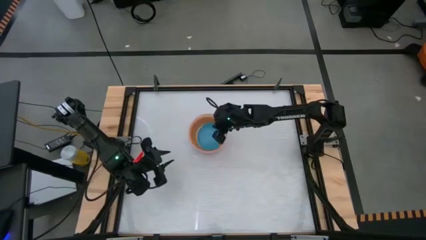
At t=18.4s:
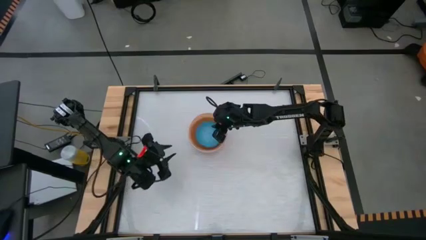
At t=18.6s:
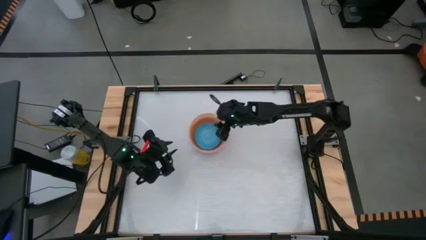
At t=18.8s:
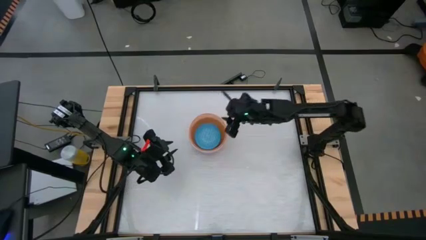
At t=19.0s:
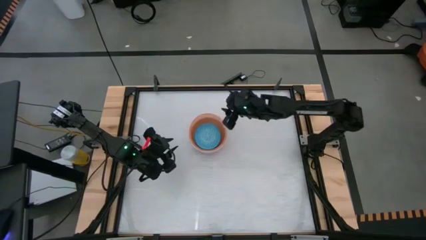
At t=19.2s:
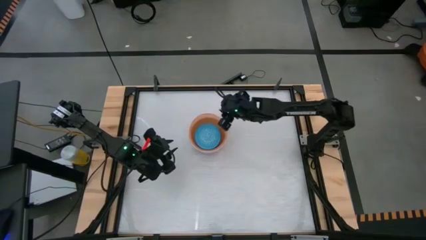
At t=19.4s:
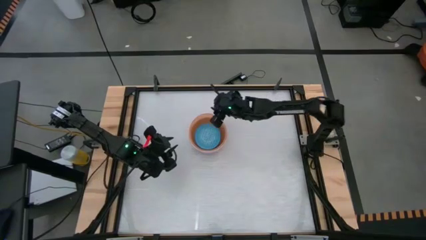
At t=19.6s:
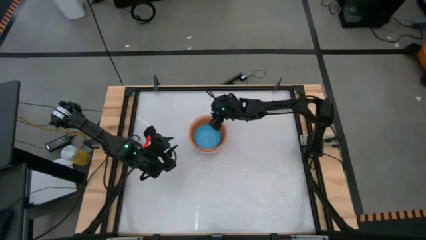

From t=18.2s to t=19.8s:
Adjust the orange bowl

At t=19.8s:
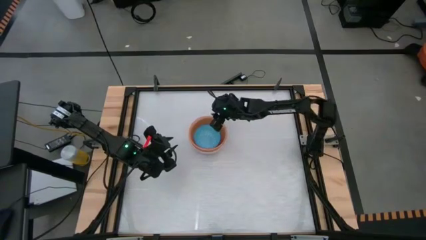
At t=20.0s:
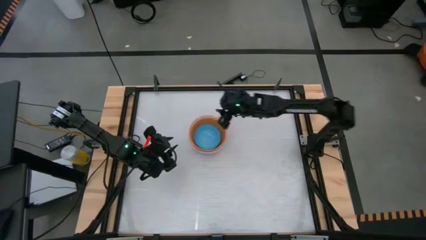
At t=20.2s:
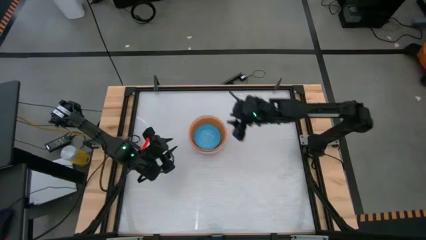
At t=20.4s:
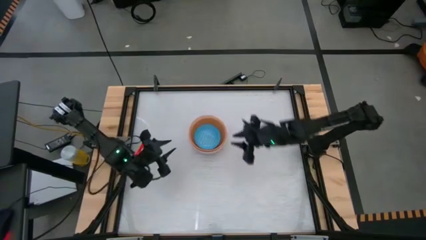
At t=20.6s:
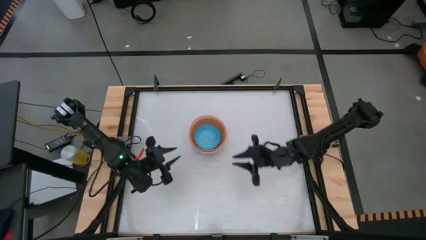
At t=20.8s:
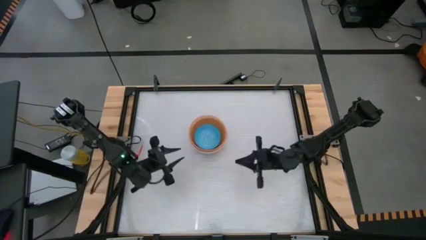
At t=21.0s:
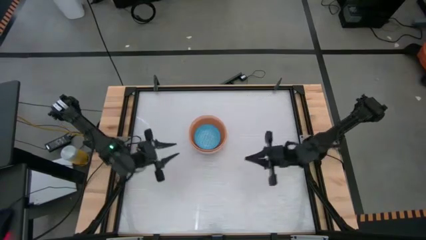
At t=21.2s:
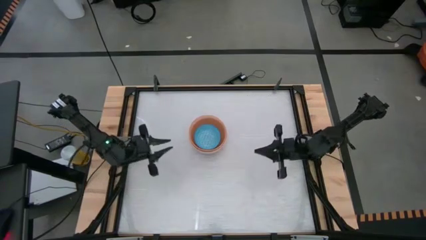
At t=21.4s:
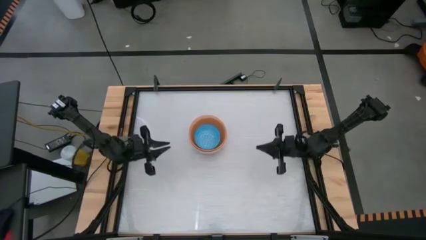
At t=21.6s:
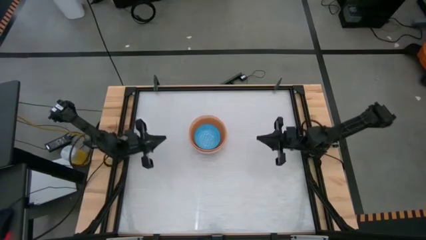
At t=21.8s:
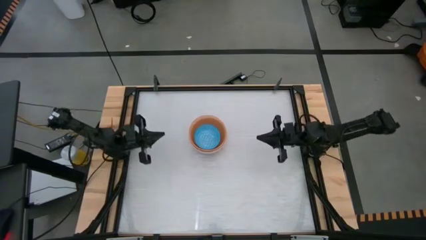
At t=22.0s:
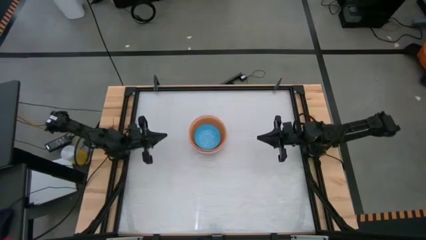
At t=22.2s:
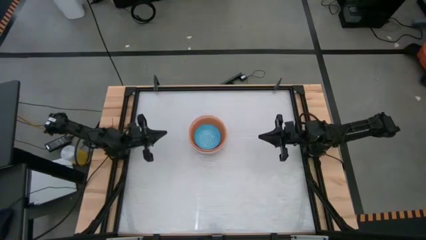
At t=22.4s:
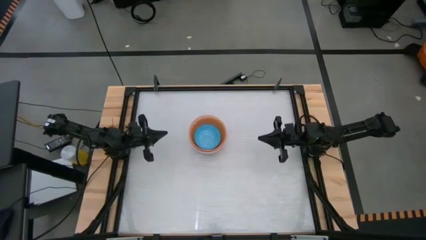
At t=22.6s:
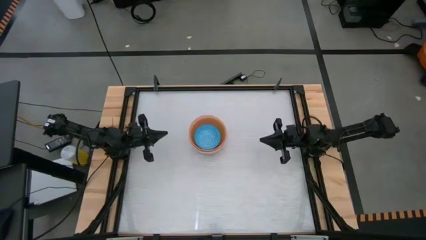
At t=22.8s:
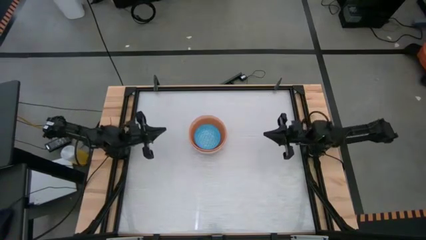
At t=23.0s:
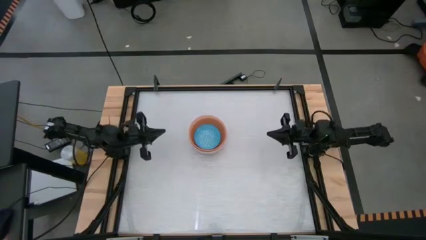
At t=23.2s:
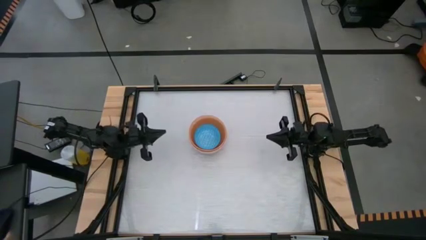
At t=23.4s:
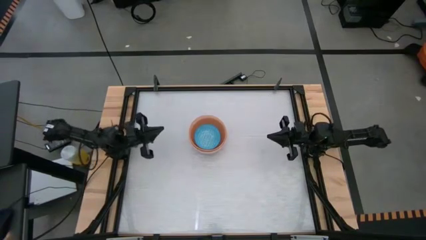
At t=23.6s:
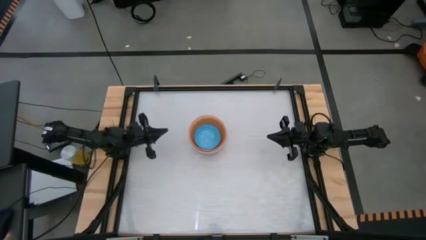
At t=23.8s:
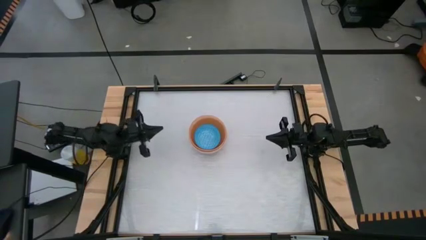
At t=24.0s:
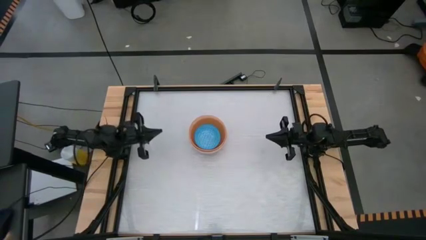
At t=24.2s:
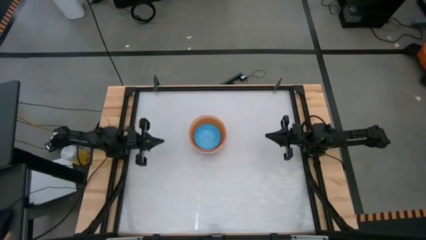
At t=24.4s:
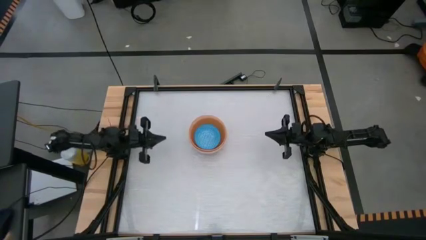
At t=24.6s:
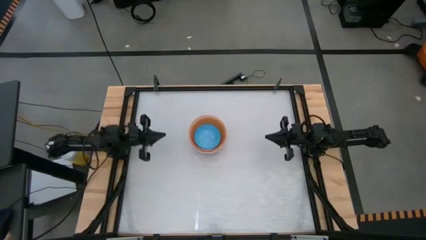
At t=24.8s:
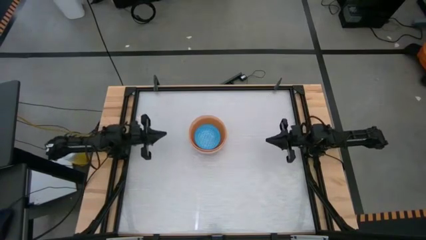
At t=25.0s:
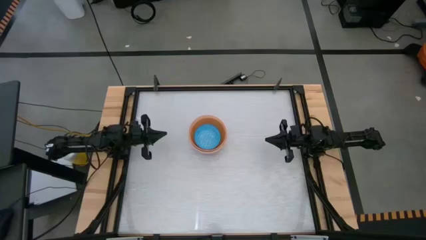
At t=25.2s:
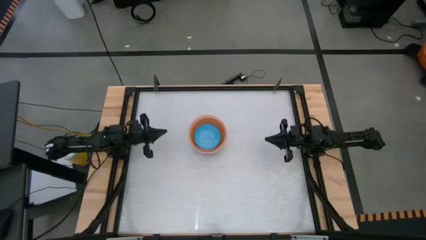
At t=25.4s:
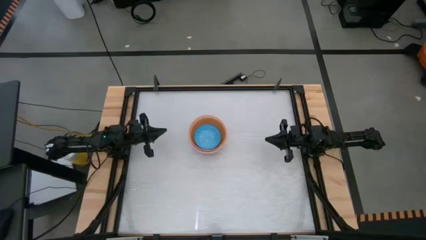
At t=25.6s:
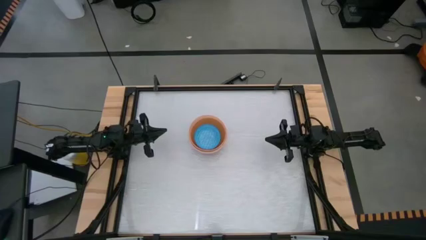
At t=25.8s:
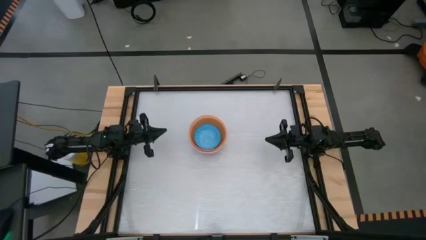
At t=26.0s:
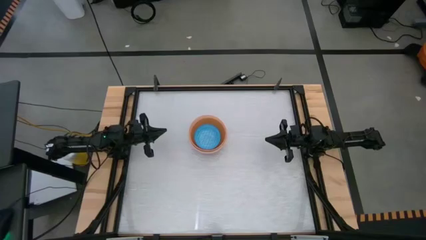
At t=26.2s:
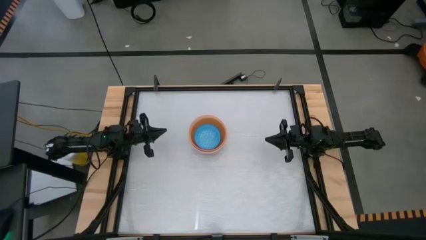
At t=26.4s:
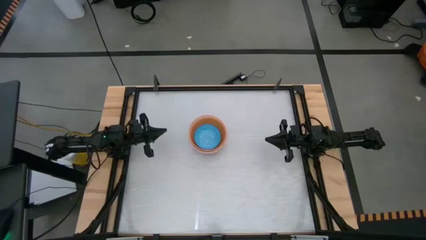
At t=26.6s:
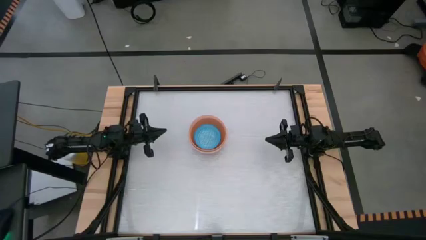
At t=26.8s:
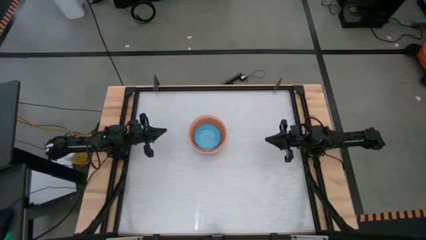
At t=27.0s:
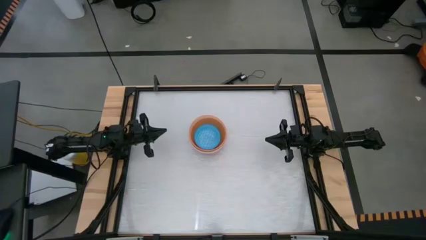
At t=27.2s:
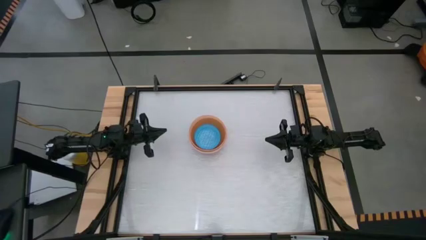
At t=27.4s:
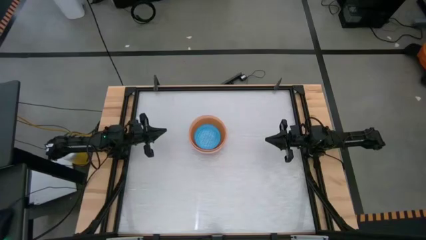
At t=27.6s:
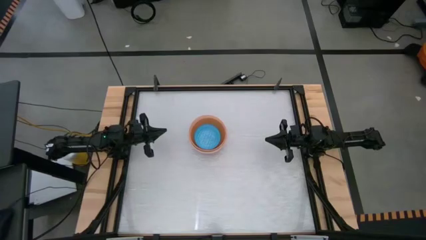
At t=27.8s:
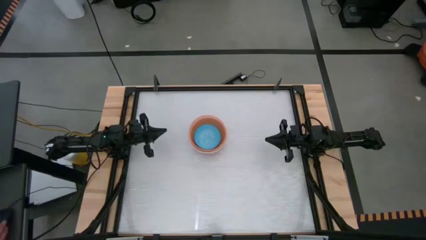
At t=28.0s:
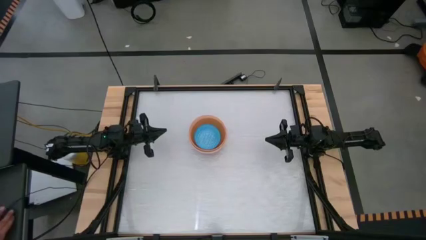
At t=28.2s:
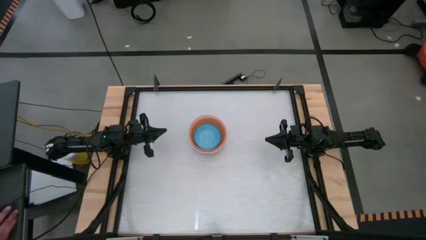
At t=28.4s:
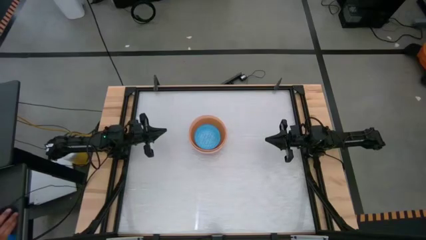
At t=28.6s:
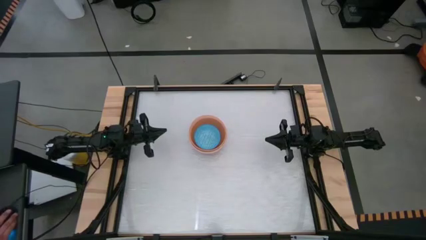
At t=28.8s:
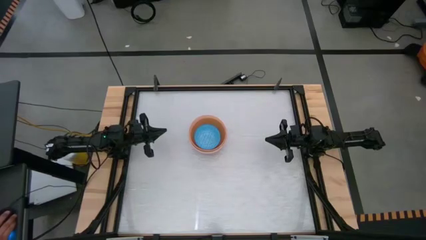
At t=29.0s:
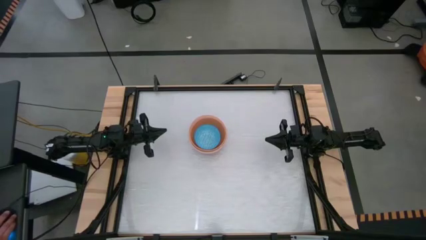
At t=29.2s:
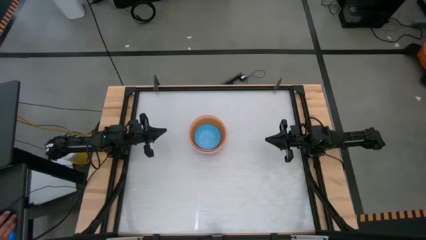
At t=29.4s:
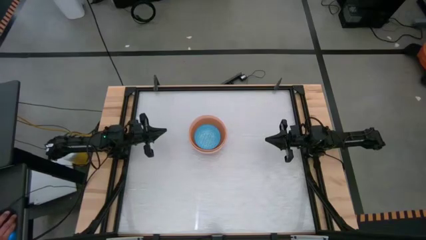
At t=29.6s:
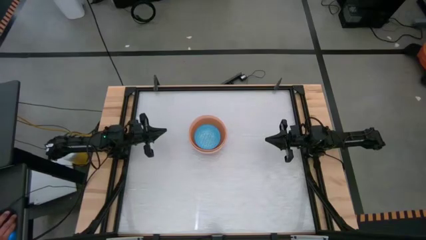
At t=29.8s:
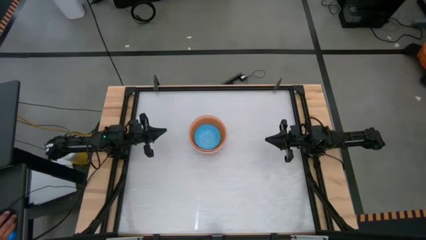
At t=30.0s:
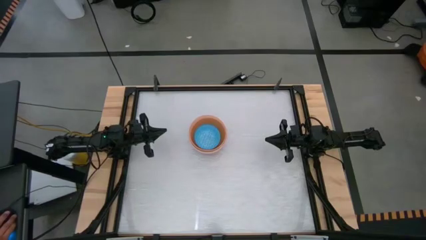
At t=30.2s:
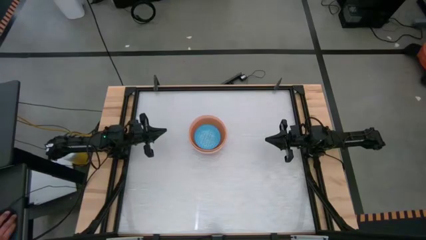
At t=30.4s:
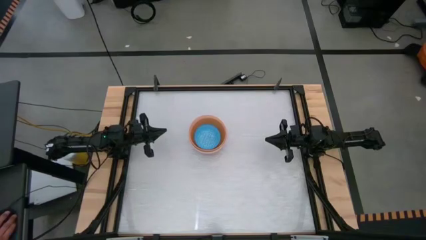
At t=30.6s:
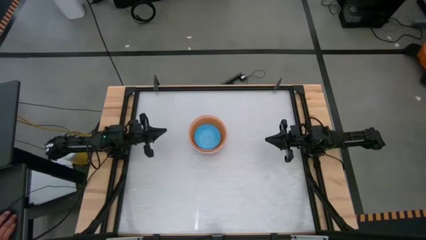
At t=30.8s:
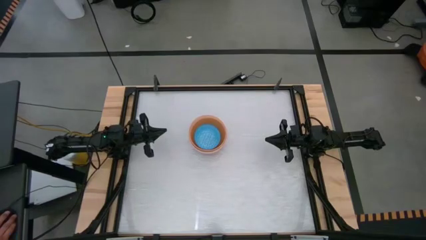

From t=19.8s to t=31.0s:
Return to Home Position

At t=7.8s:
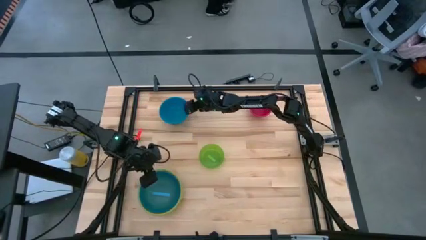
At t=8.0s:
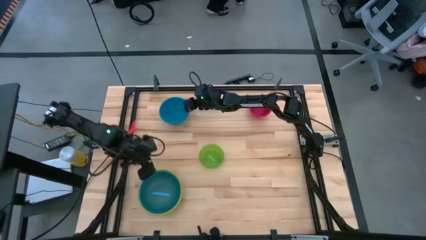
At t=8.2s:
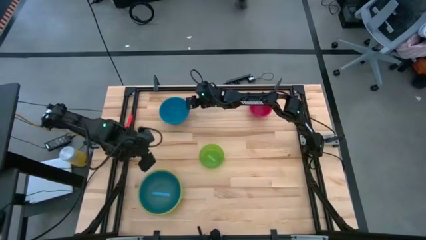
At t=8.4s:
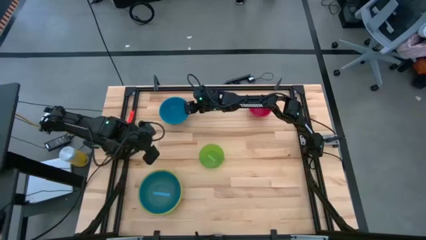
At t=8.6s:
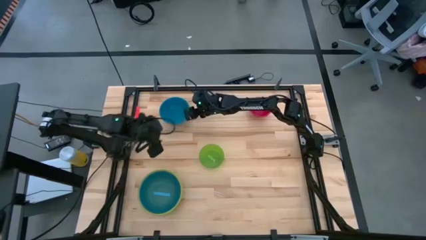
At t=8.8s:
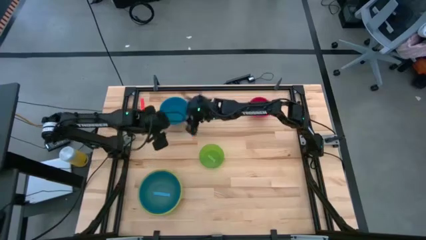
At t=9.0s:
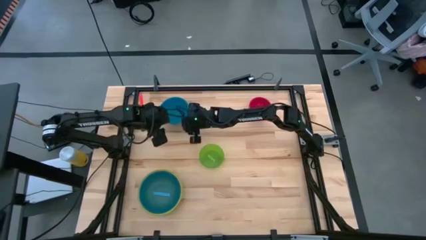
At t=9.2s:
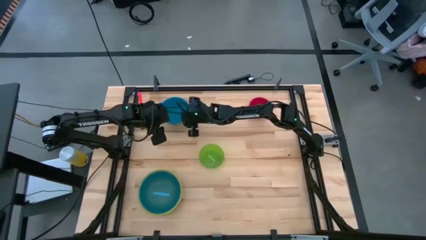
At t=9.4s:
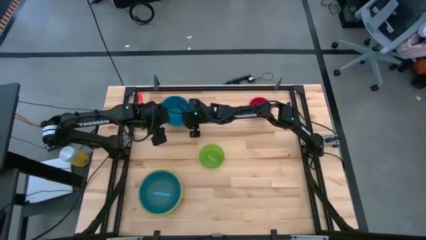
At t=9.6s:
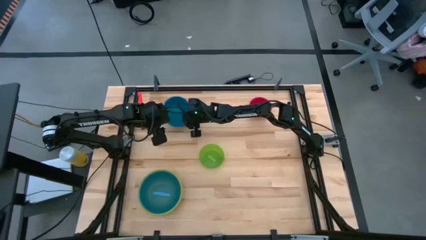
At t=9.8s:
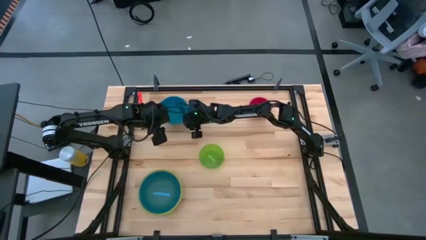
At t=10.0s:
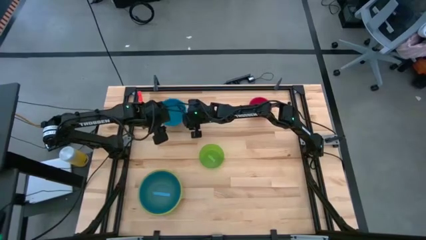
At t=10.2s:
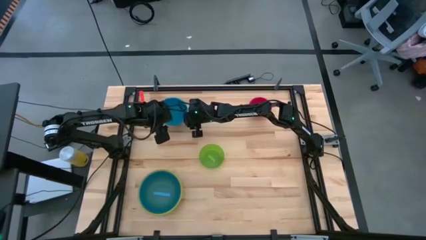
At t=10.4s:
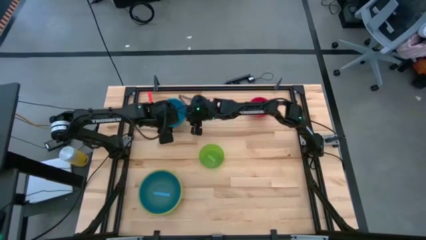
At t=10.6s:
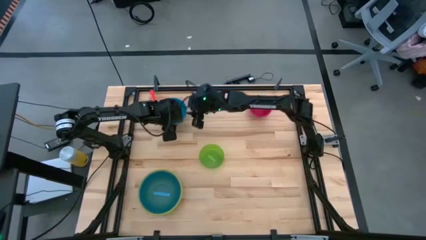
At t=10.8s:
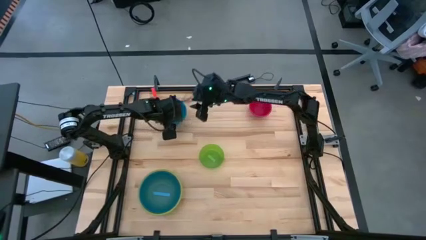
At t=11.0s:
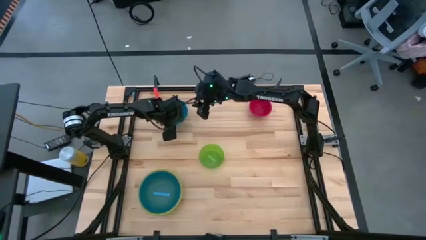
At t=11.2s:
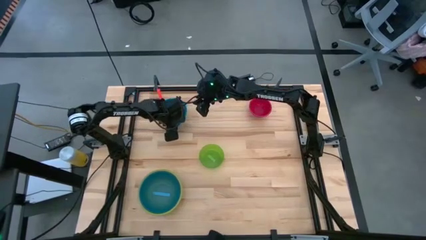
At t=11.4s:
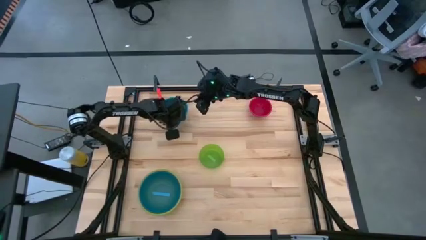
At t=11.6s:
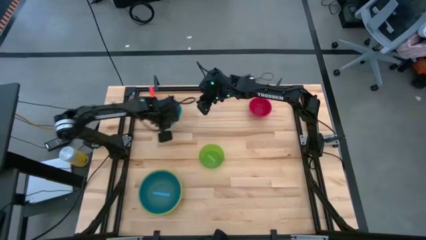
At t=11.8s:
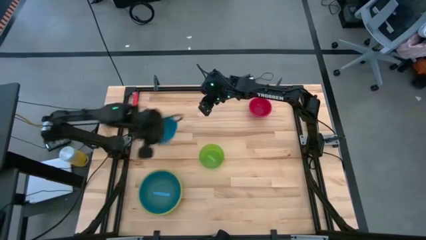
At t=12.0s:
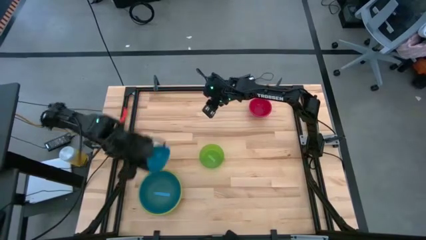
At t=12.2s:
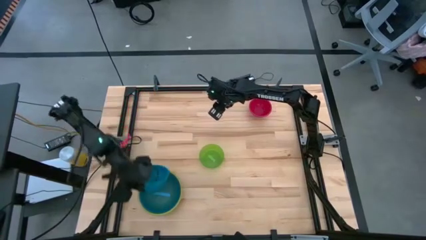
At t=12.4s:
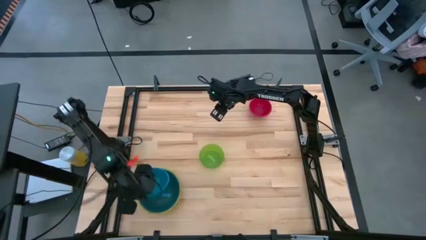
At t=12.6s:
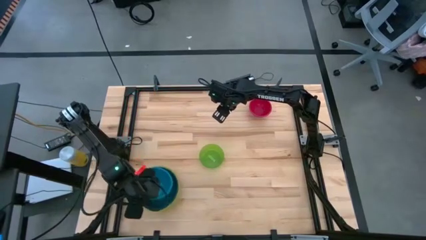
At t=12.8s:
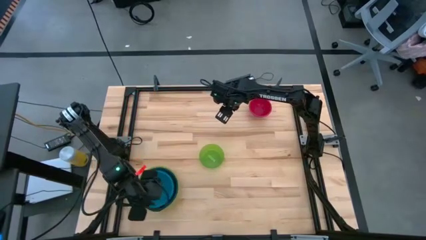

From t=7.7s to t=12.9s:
Stack the blue bowl on top of the light blue bowl
